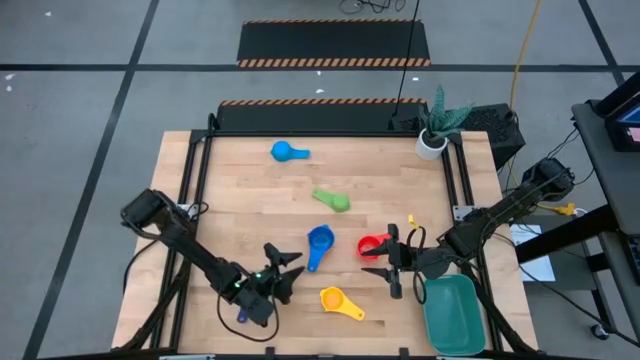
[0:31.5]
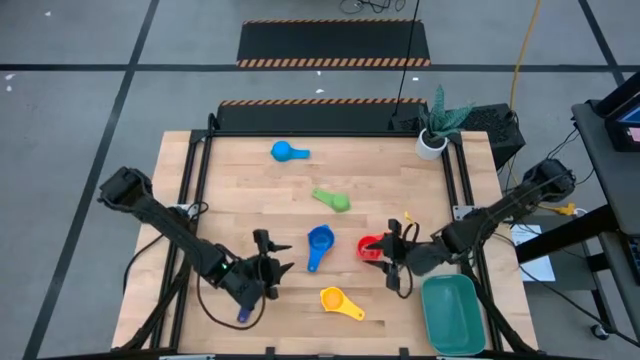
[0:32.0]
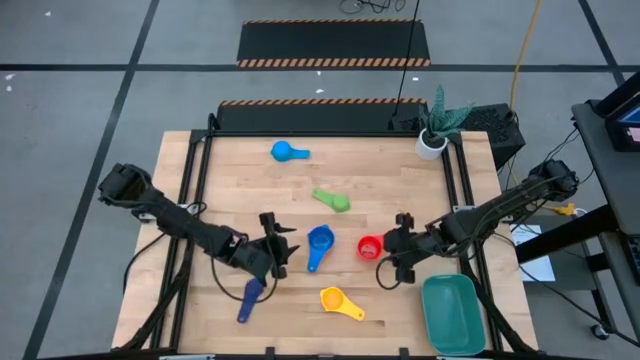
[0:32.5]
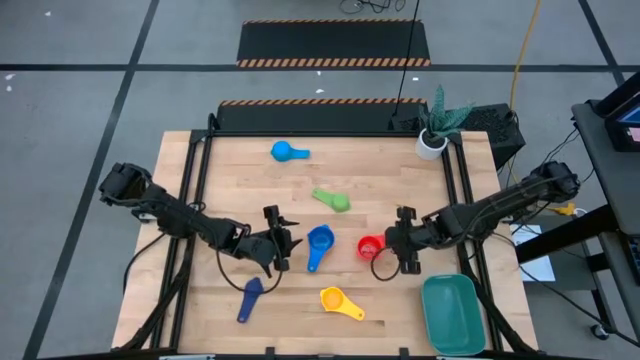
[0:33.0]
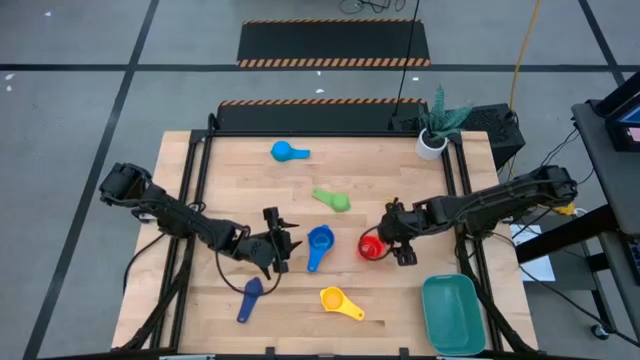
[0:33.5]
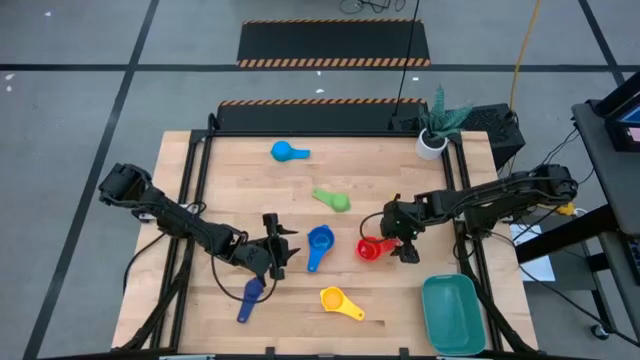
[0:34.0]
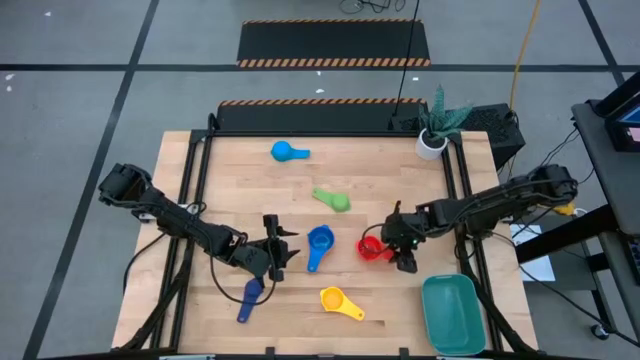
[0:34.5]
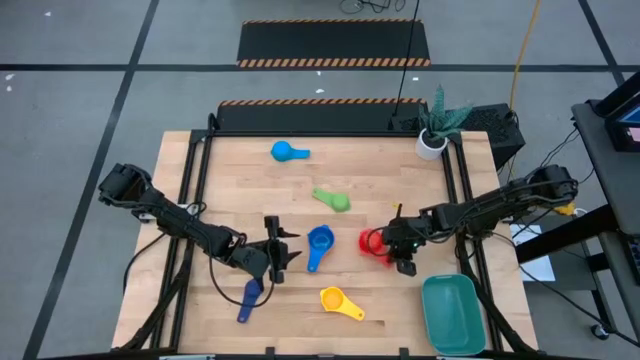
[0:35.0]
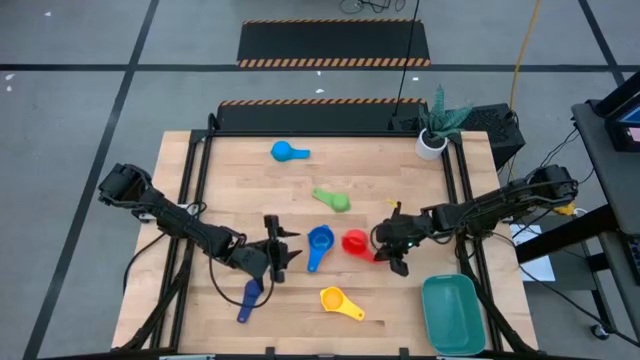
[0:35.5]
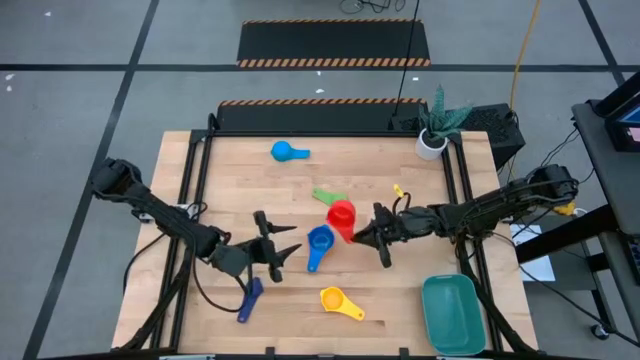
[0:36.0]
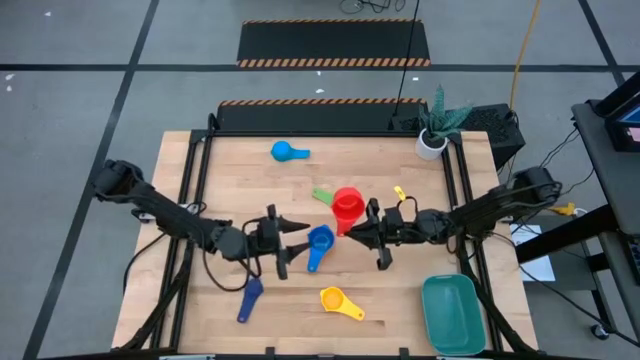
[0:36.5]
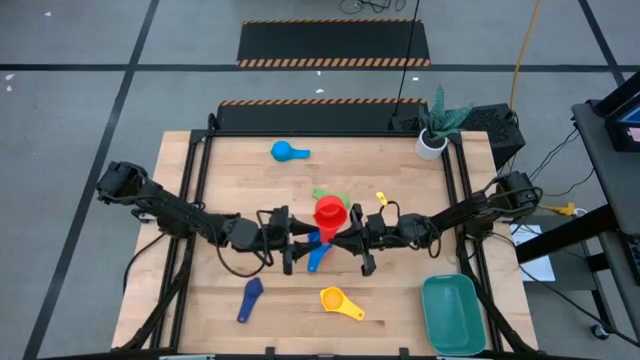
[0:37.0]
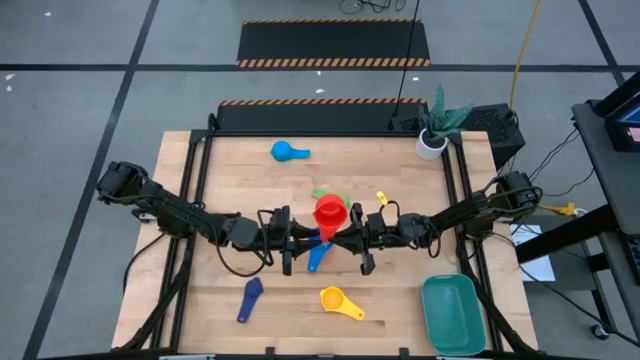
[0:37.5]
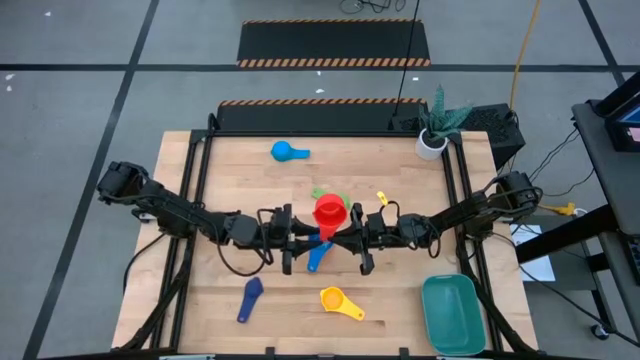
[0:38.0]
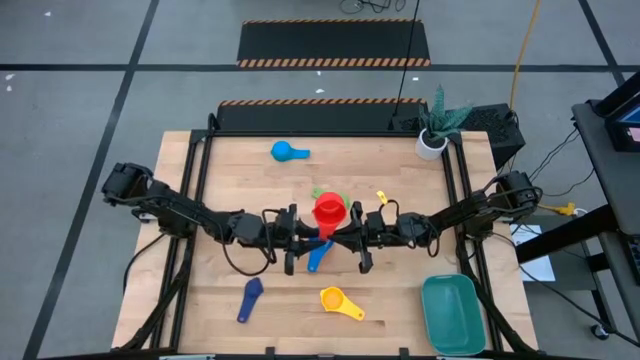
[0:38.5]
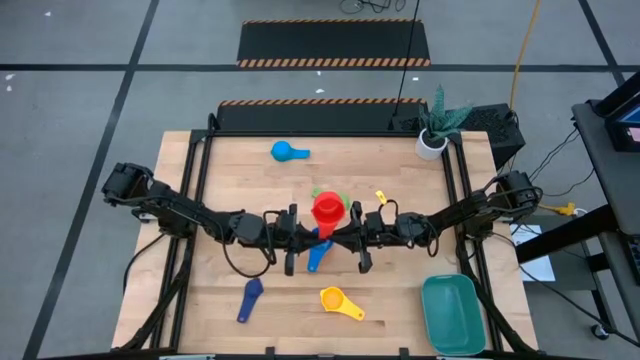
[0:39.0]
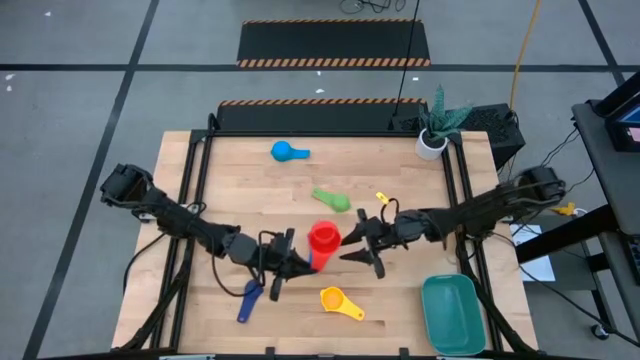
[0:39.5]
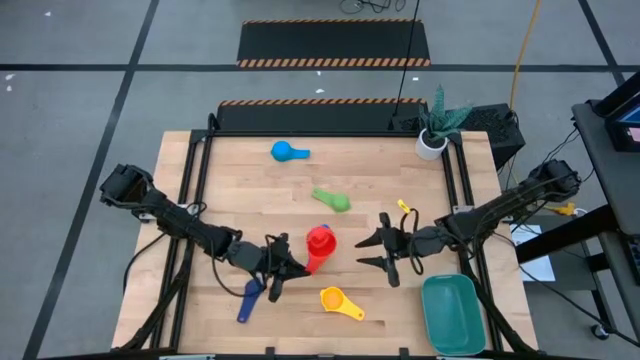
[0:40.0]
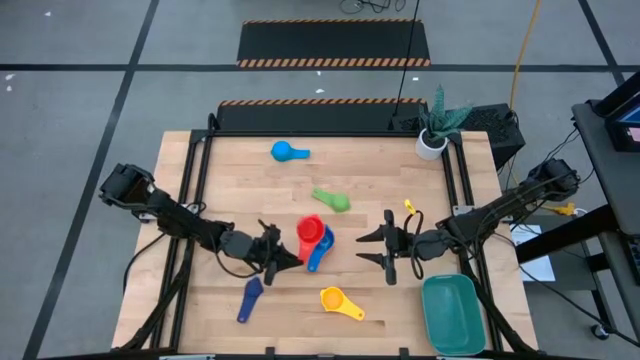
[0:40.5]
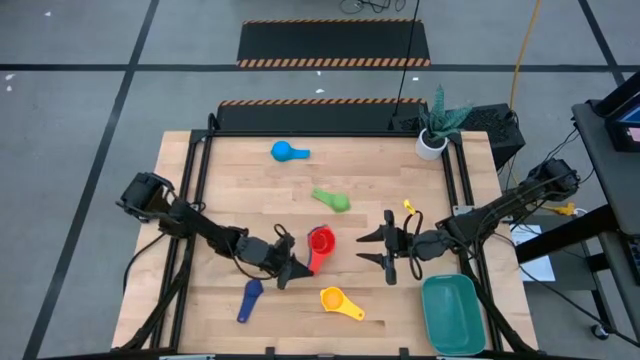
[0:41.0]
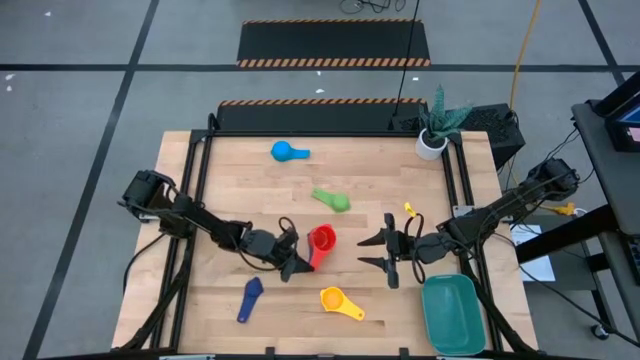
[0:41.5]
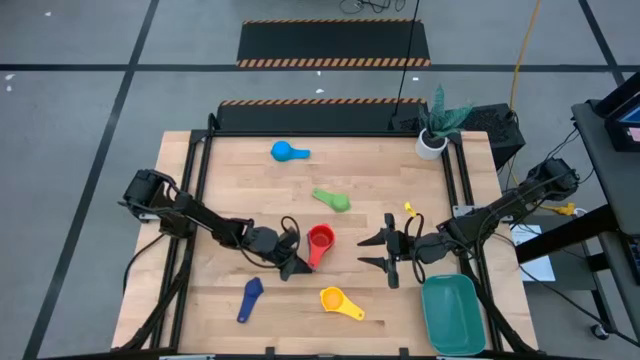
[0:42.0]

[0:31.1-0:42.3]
Task: Nest measuring cups in basket
Stack the red measuring cup on top of the blue measuring cup

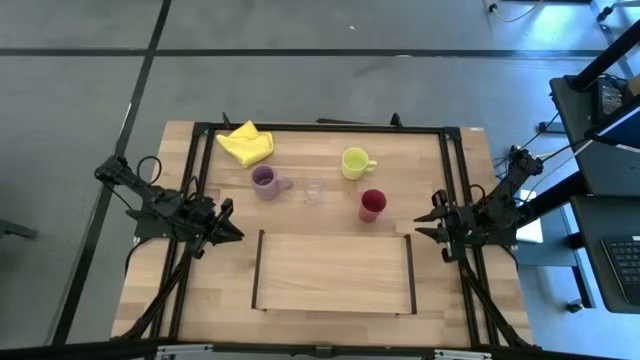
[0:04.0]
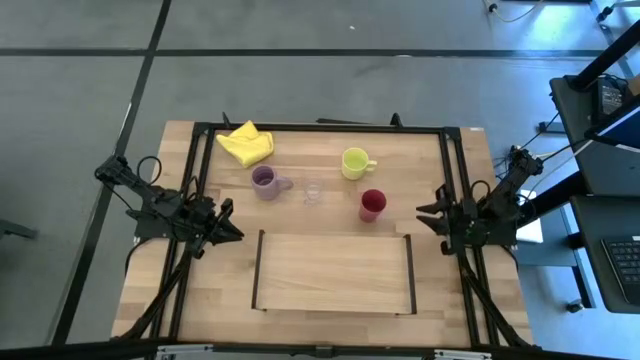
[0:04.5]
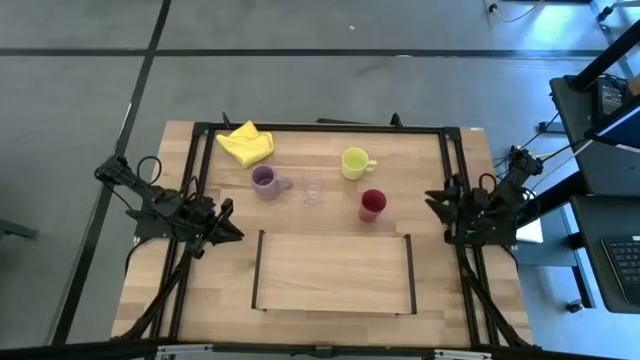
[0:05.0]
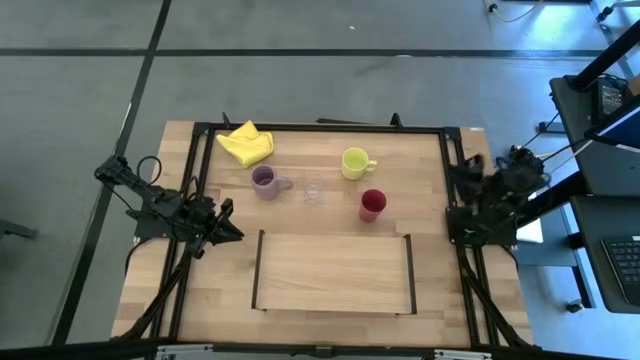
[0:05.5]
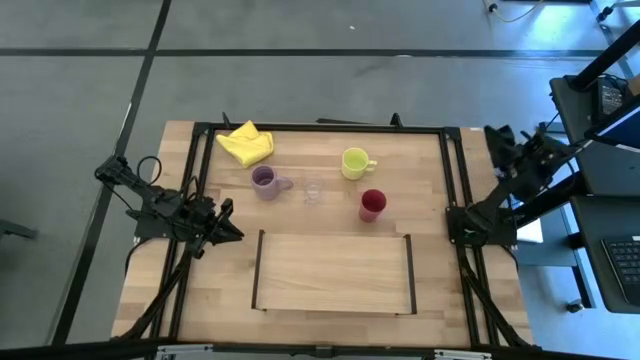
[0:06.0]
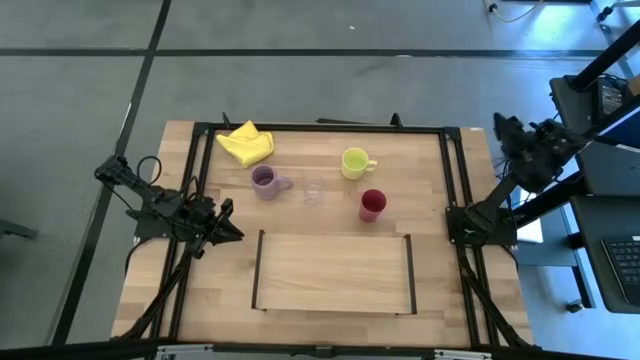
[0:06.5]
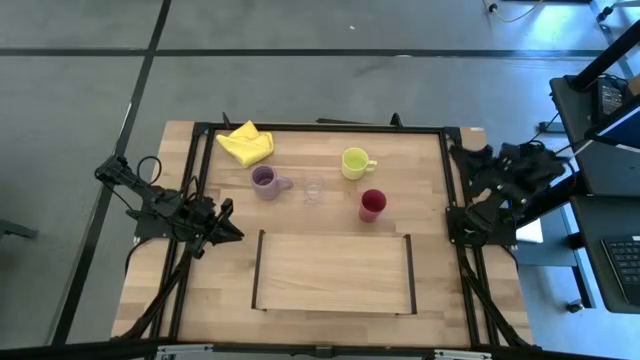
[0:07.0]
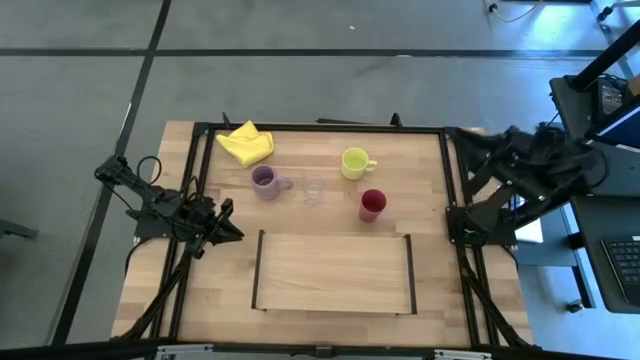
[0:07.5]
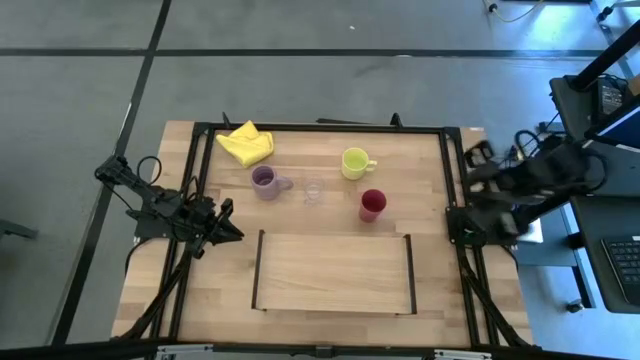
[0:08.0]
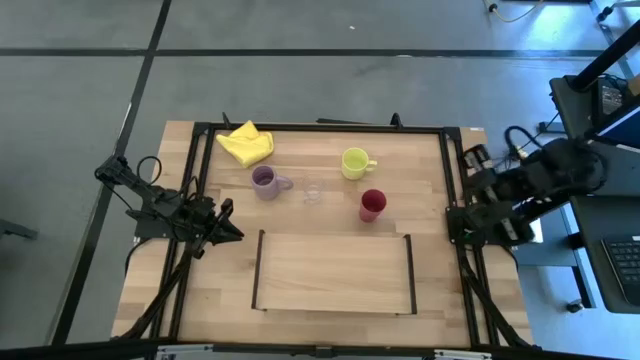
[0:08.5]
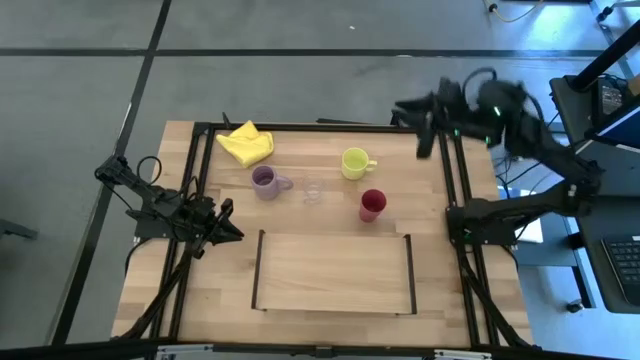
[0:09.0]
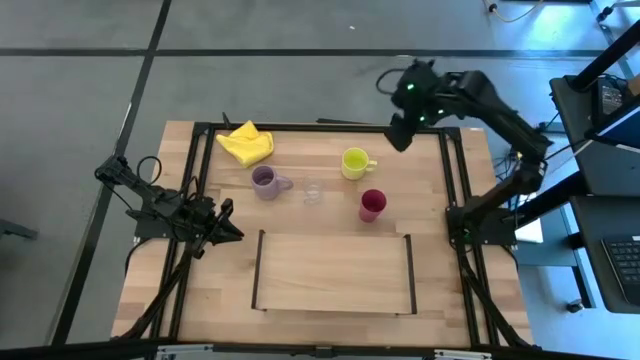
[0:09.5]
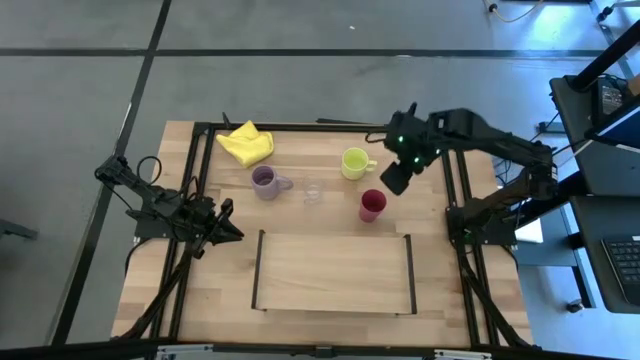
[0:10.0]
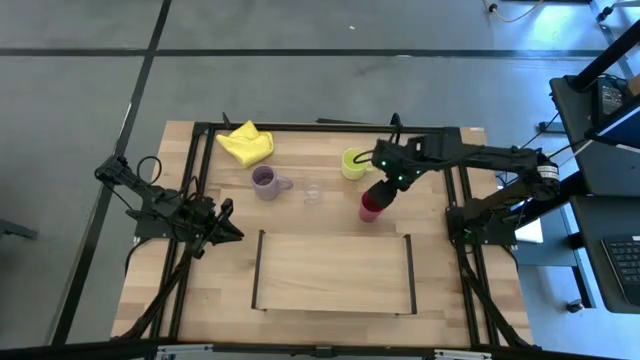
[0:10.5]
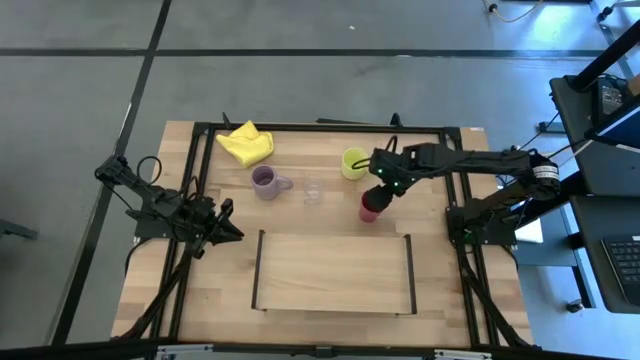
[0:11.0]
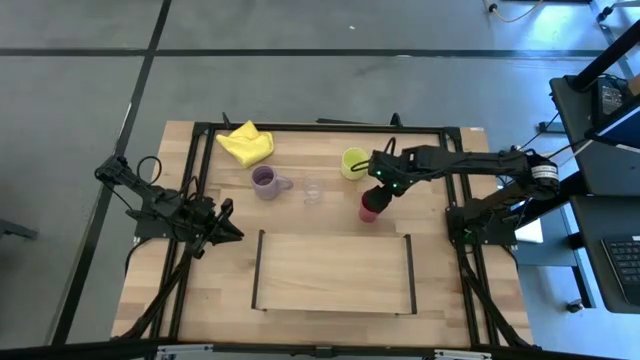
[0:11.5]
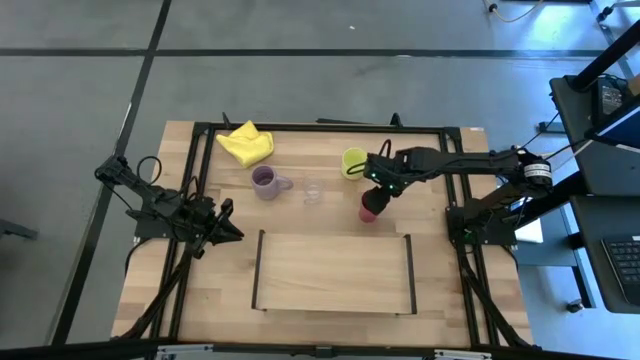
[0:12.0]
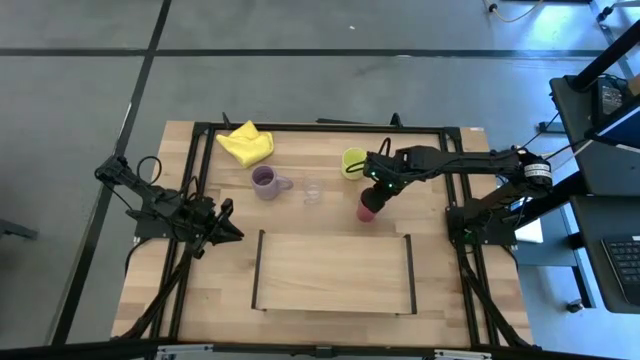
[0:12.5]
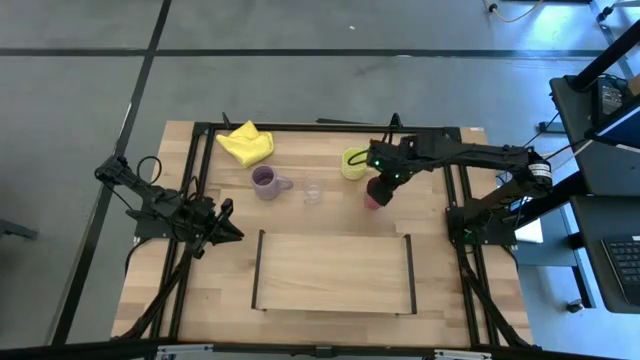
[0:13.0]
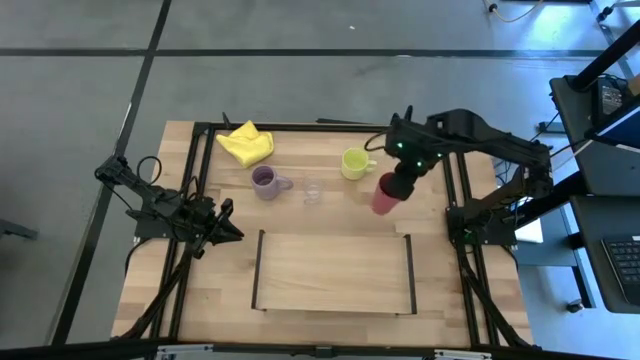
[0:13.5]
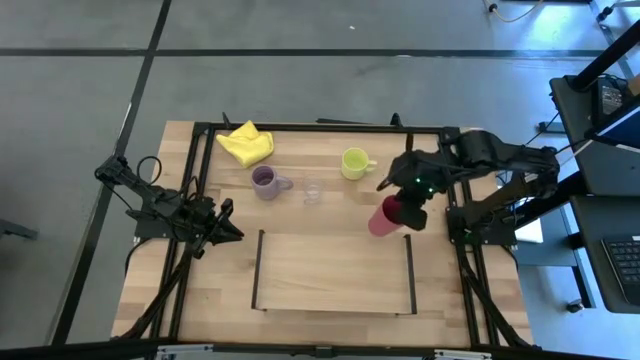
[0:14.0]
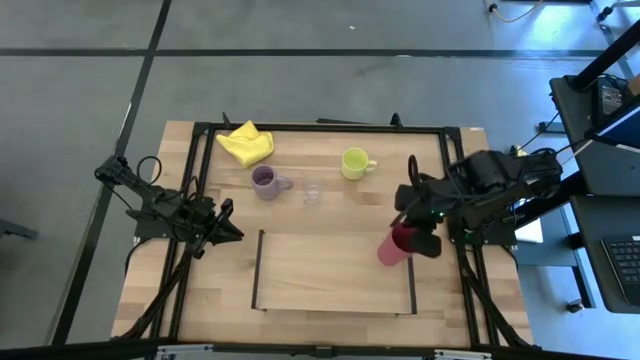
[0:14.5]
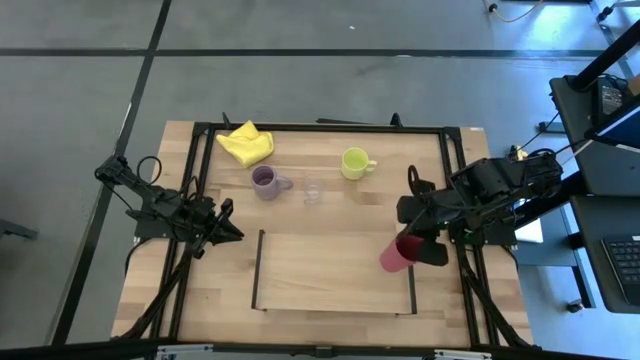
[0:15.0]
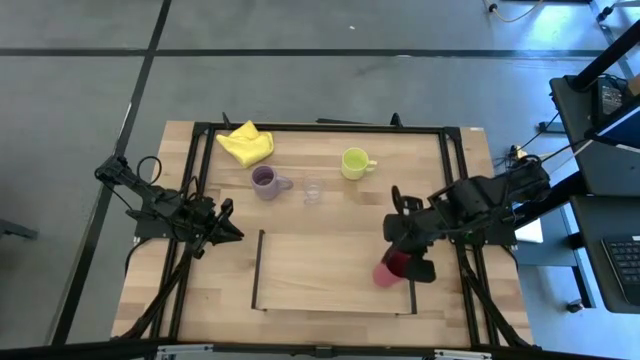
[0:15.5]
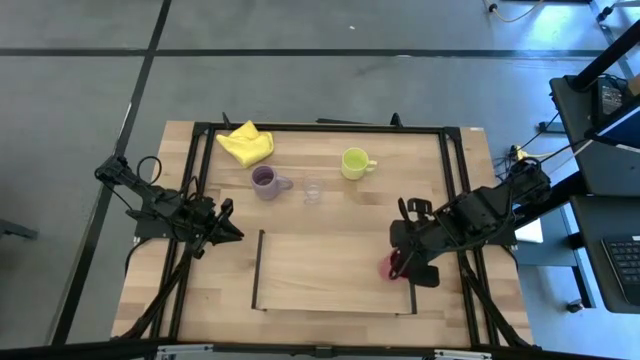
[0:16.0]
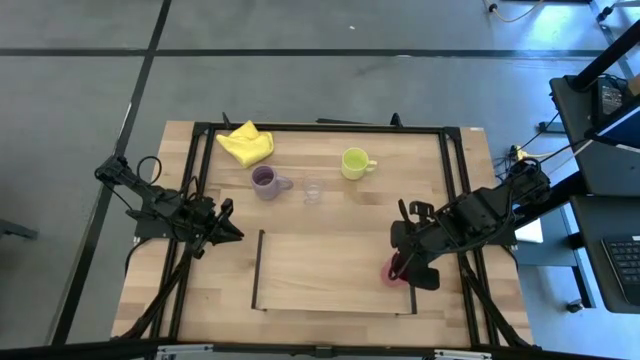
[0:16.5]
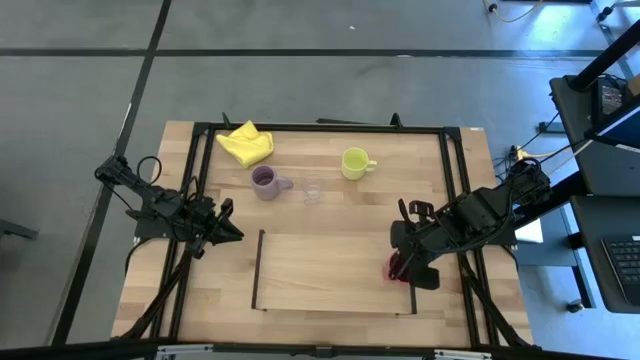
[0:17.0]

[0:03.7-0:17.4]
Task: Stack small to large cups/mugs on shelf
Put the pink cup on the shelf
